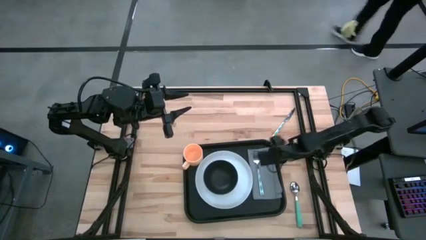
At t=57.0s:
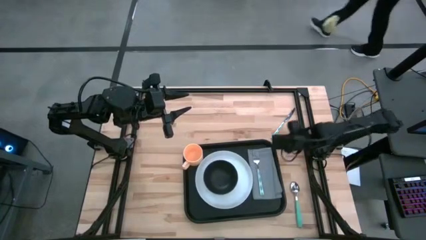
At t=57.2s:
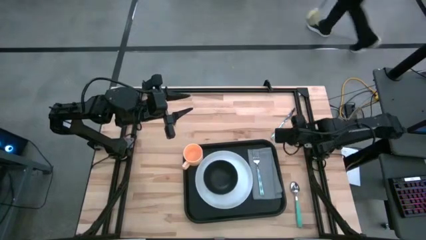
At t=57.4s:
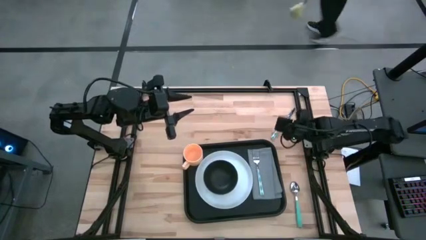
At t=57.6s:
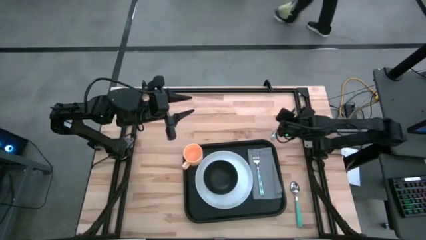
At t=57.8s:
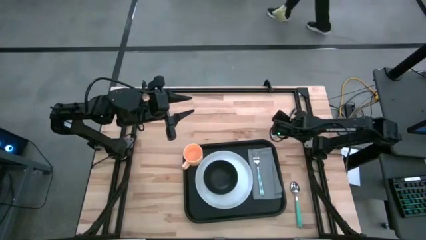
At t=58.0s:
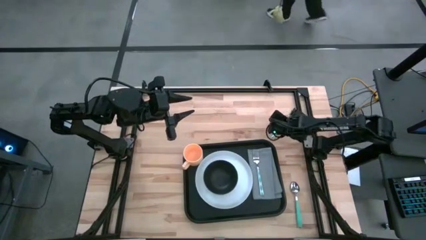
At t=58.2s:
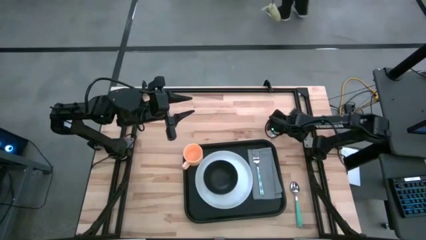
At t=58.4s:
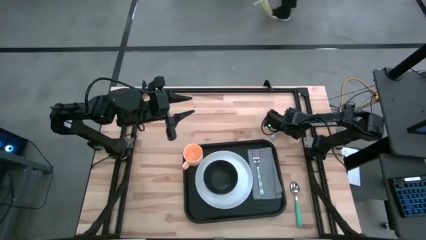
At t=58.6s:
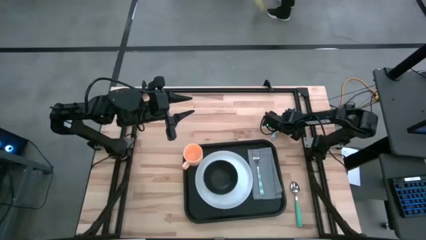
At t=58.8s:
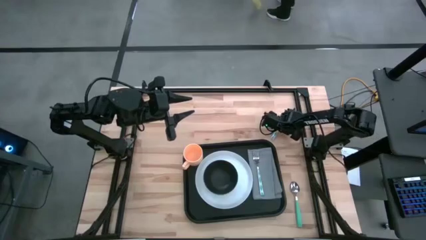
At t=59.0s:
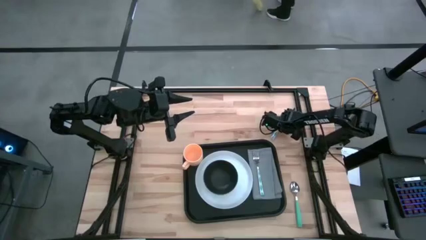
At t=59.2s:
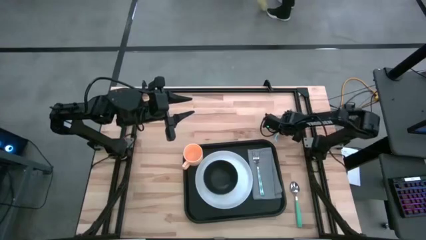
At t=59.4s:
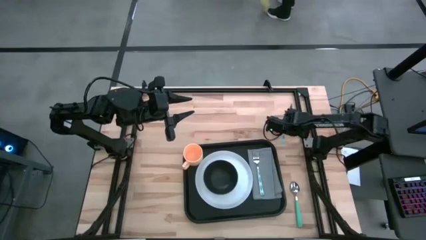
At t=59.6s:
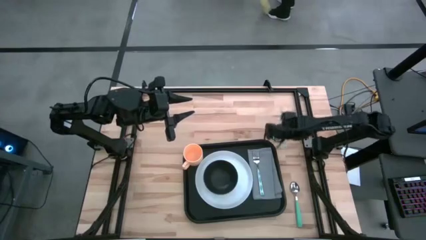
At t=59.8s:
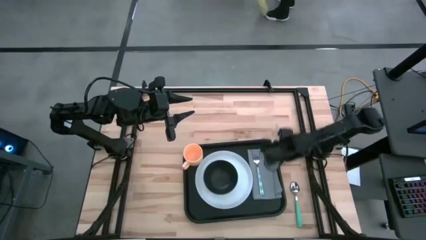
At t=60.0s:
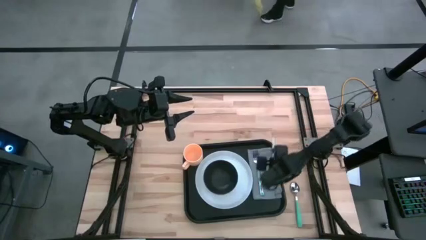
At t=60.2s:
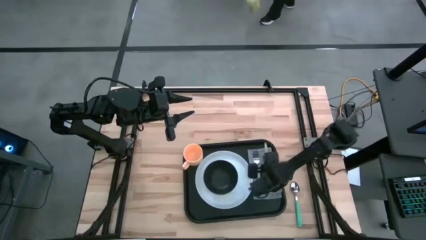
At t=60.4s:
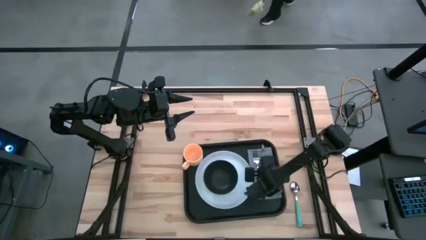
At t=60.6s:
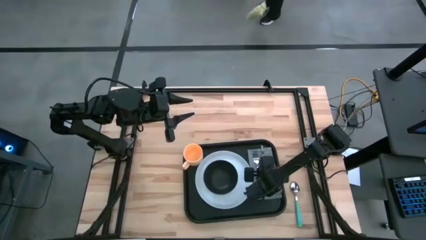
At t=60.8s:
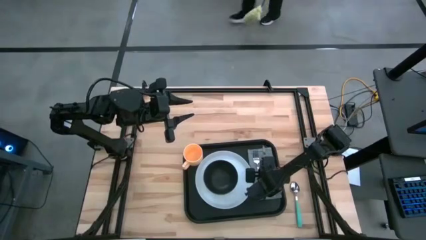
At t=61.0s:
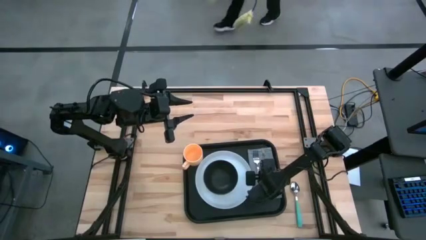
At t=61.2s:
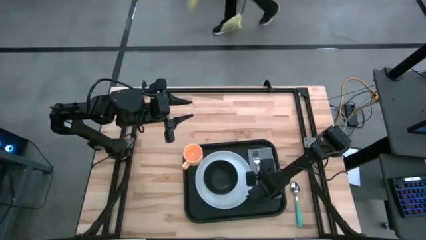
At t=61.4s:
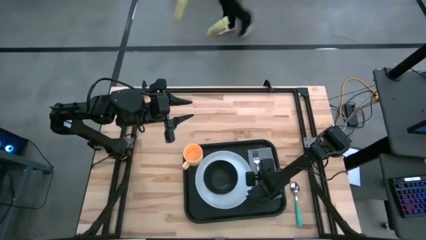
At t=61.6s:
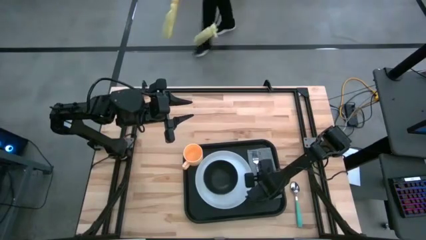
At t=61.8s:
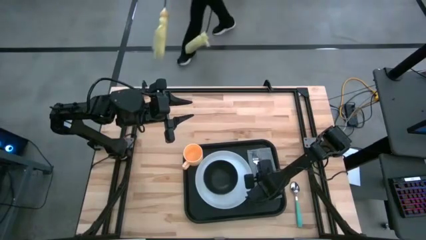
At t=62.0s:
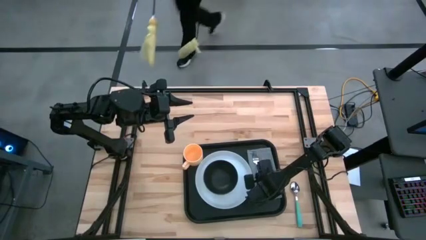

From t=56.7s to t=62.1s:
Task: Set up tray
Put the white knife to the right of the white fork on the gray napkin

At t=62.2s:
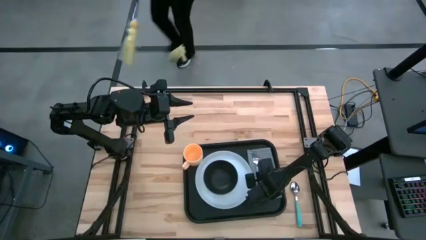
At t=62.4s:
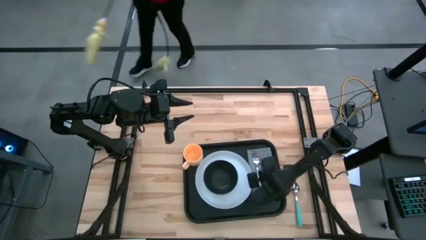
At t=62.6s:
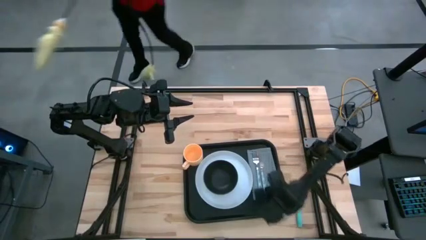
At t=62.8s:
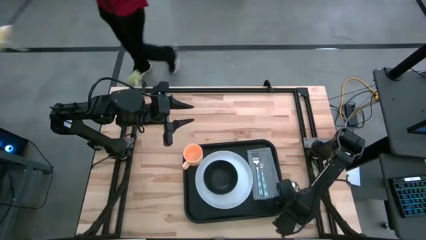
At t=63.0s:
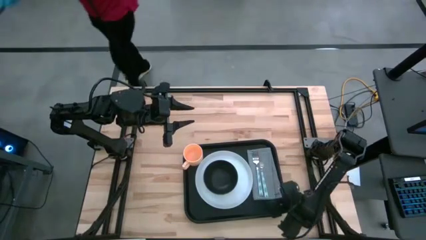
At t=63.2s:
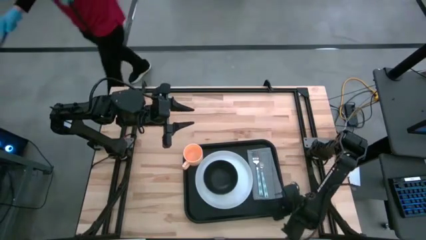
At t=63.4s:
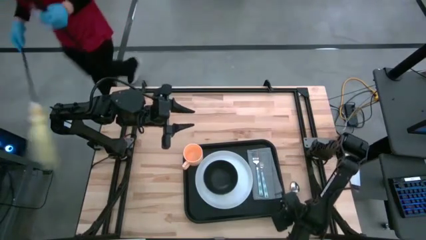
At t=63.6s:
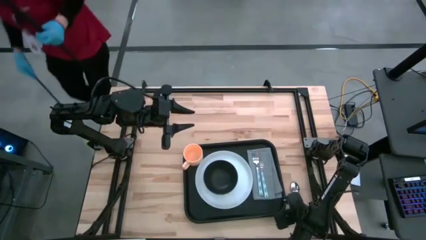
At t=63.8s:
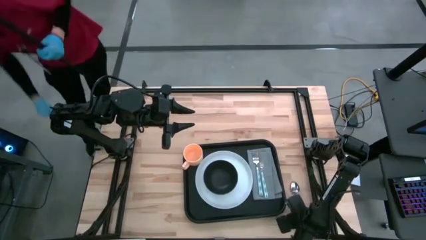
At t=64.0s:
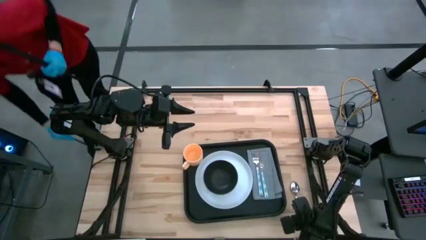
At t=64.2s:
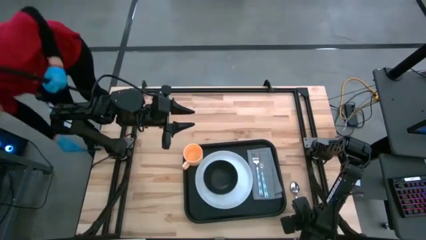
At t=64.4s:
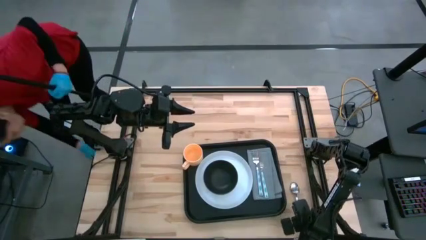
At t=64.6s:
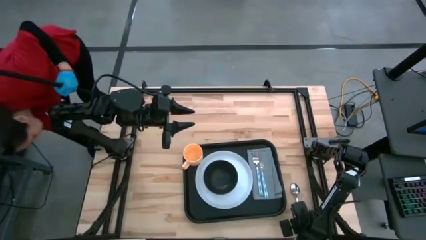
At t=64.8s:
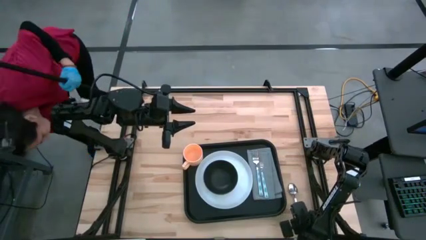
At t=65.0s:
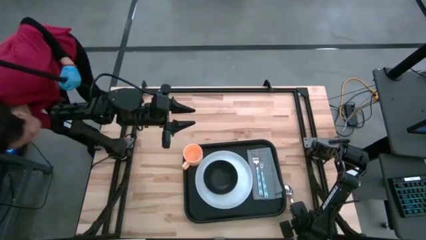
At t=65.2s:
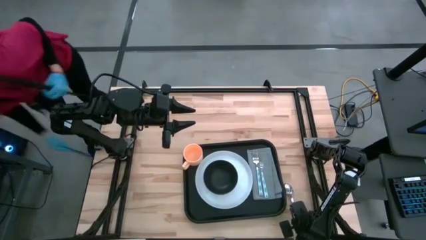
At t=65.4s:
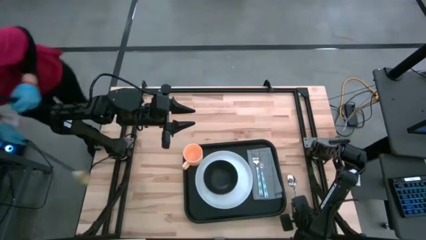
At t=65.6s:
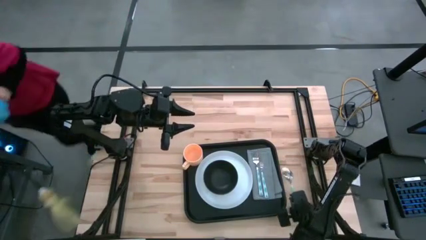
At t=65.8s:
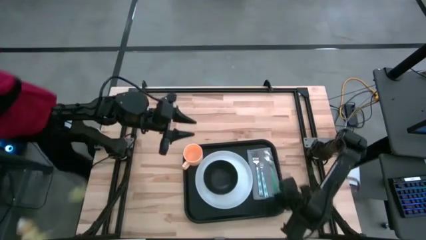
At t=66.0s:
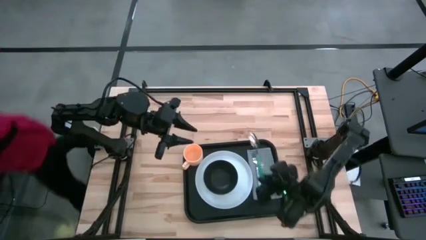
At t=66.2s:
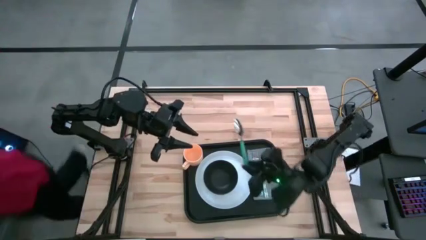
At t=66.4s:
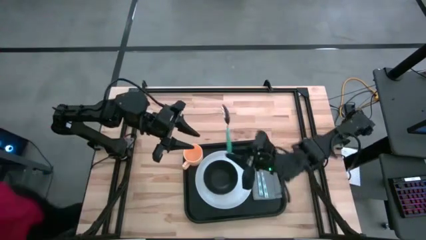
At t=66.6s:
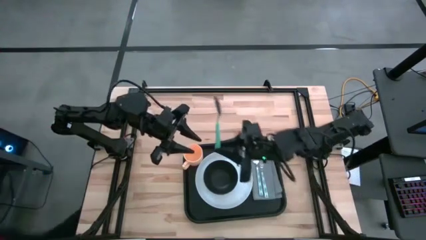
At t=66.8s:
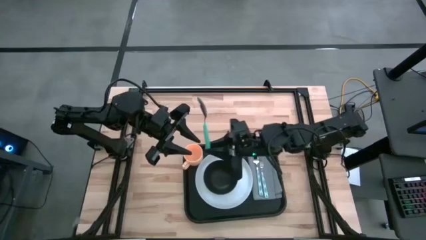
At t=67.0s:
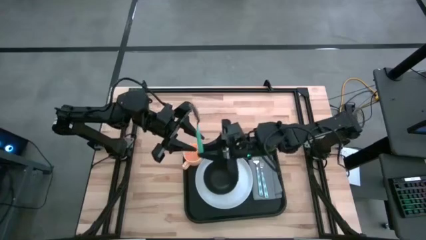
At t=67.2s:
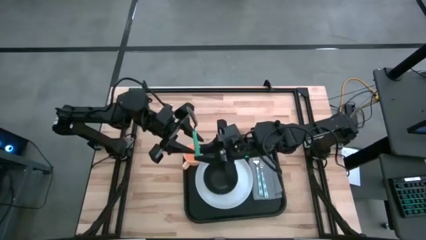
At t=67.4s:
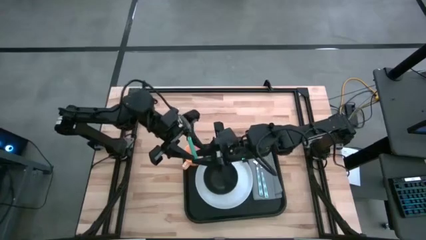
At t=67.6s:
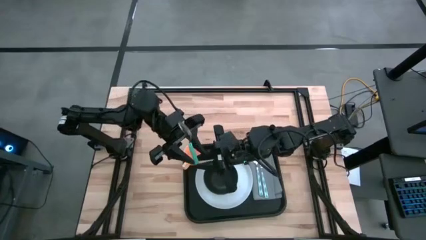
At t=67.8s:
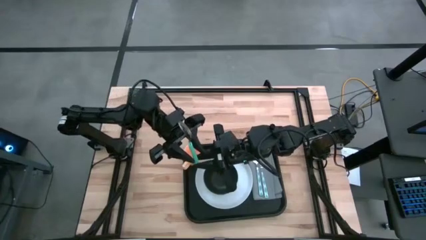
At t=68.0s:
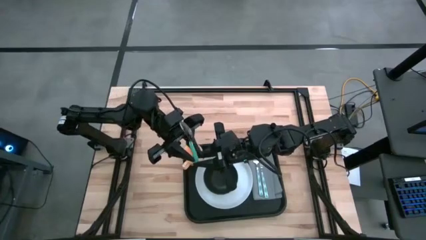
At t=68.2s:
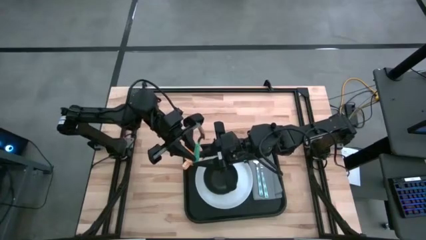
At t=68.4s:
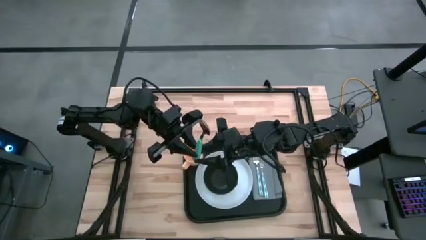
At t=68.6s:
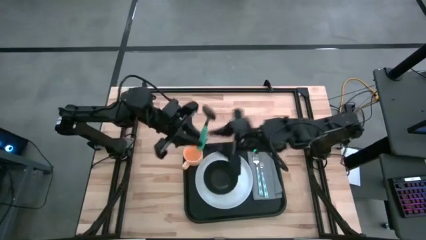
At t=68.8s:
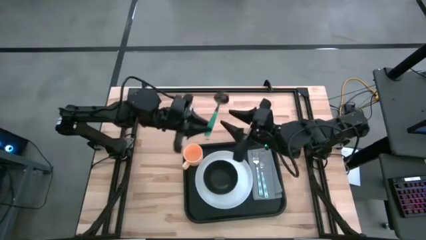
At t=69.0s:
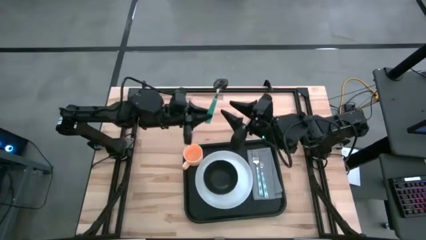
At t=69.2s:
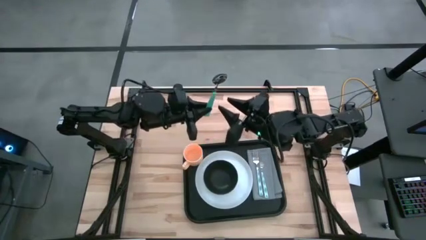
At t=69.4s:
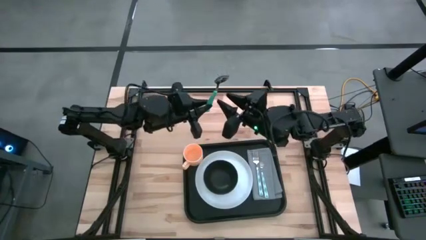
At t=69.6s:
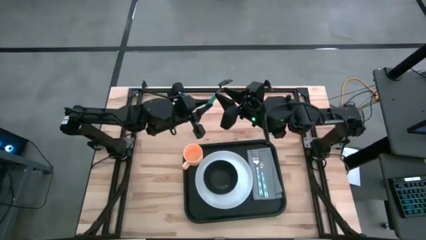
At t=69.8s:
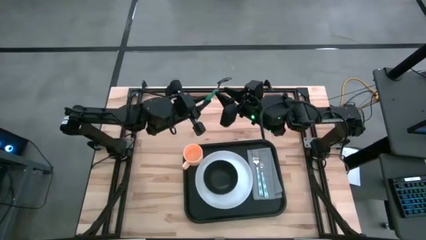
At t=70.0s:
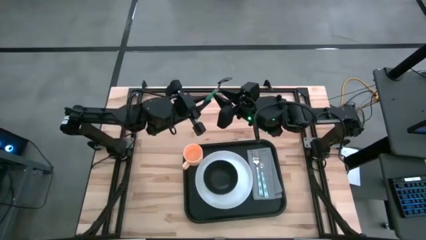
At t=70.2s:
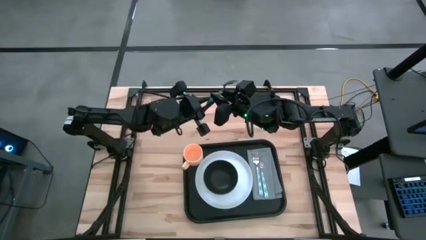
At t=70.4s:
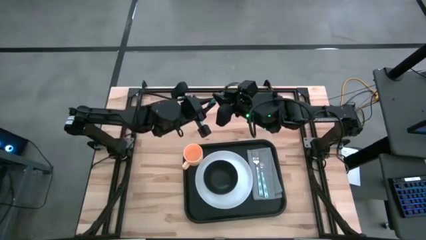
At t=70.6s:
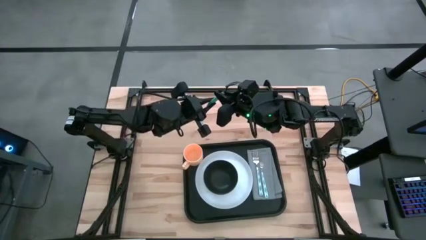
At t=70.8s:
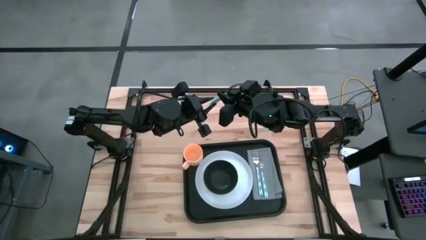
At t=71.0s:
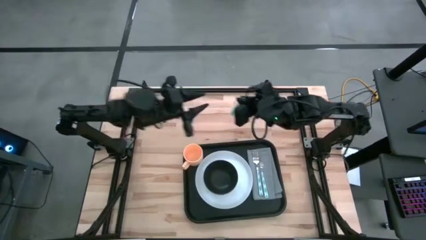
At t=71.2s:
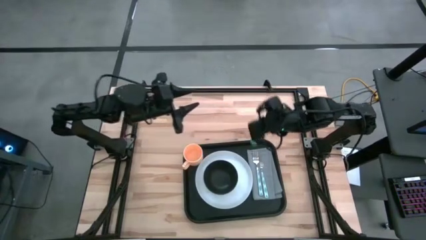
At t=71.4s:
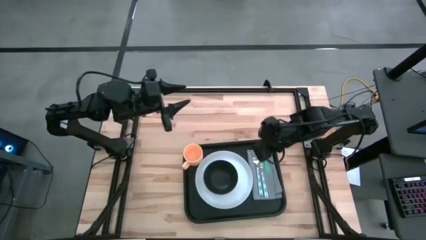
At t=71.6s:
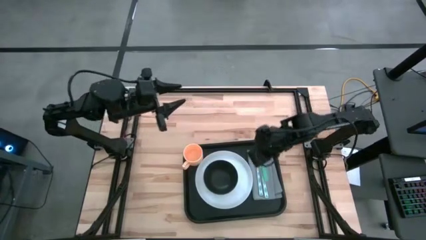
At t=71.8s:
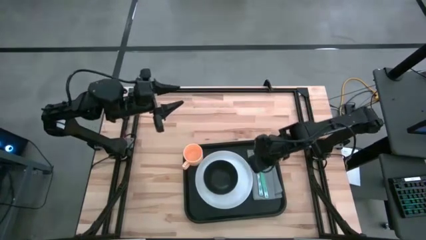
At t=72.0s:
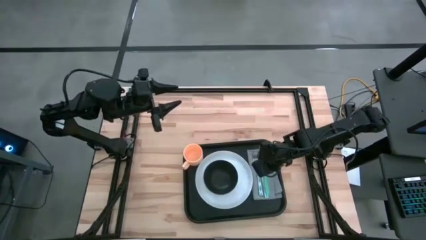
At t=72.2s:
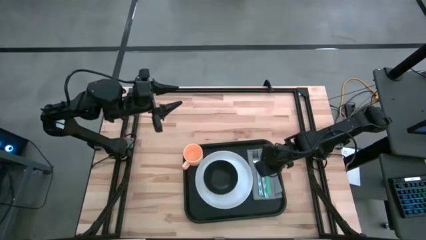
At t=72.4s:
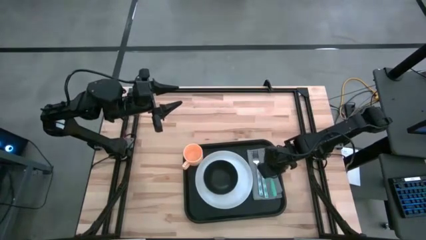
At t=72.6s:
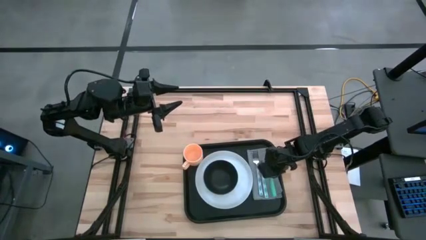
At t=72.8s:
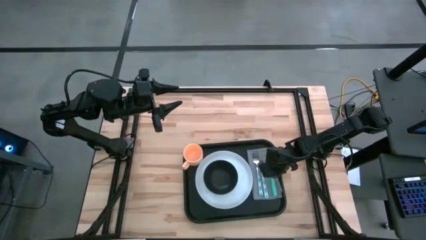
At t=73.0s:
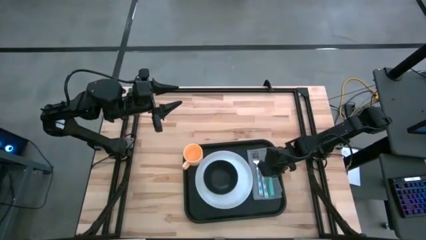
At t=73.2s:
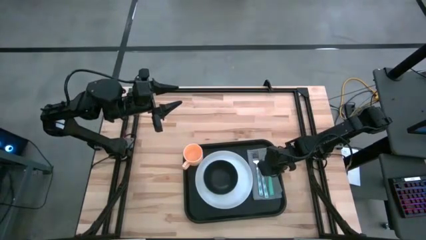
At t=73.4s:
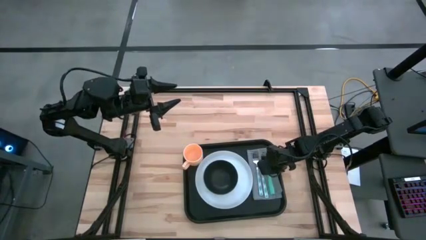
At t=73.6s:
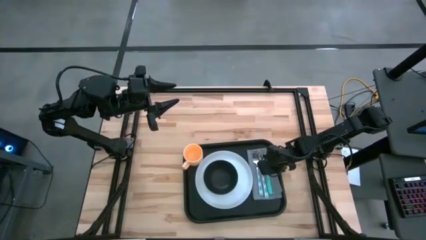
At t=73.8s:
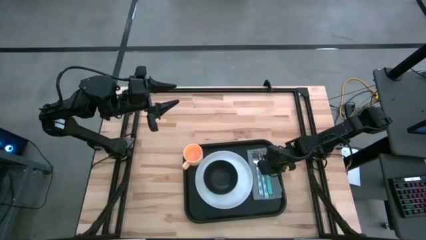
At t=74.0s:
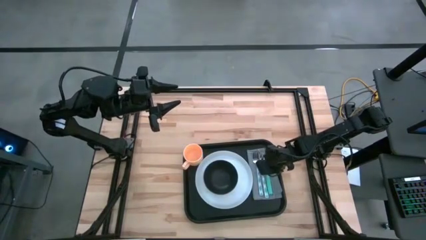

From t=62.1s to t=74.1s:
Put the blue spoon to the right of the white knife on the gray napkin
